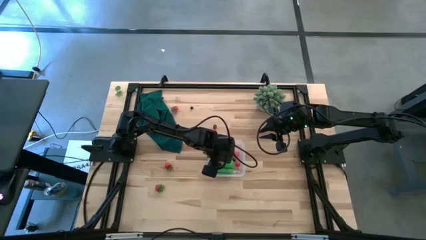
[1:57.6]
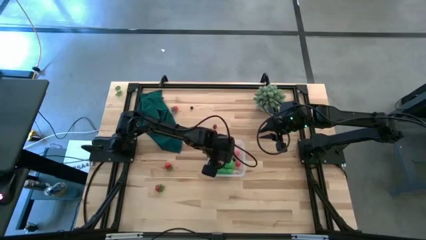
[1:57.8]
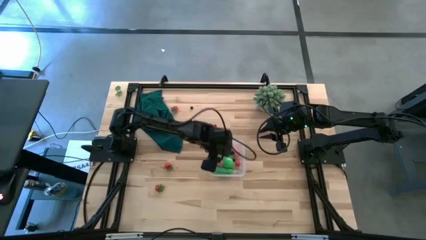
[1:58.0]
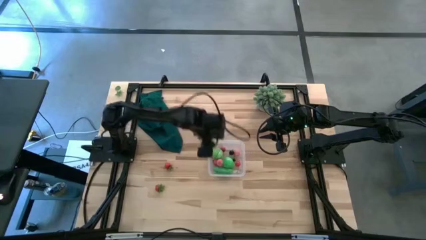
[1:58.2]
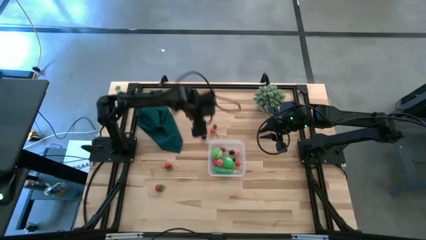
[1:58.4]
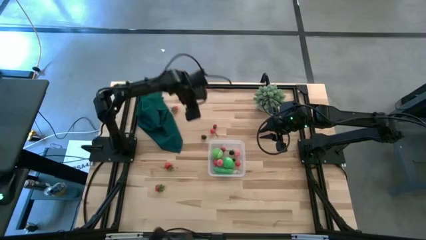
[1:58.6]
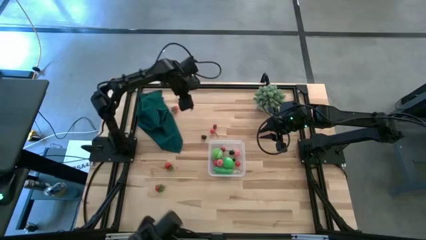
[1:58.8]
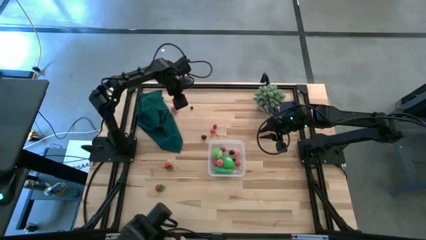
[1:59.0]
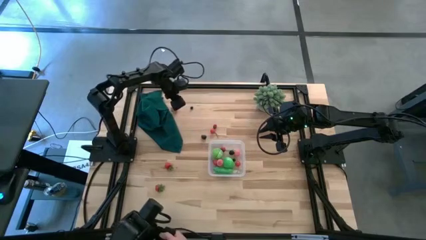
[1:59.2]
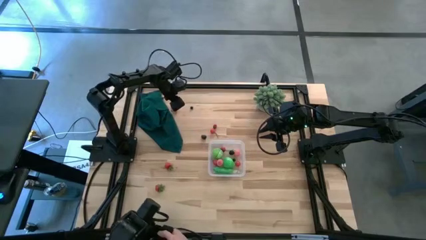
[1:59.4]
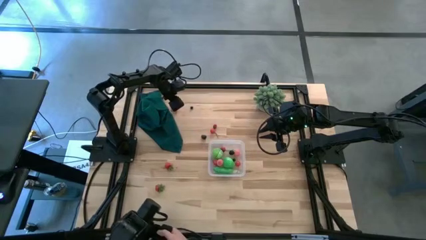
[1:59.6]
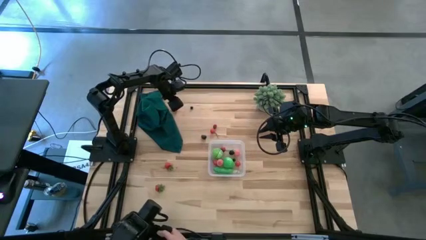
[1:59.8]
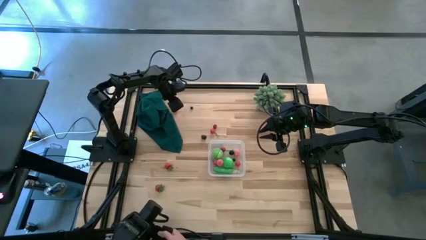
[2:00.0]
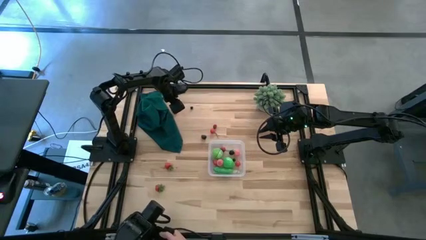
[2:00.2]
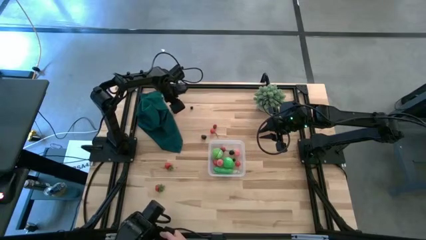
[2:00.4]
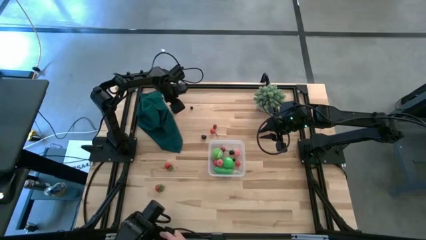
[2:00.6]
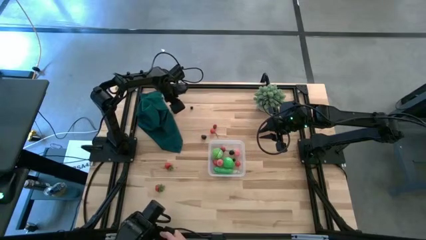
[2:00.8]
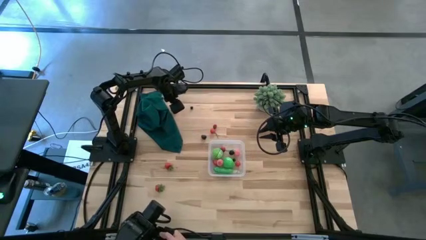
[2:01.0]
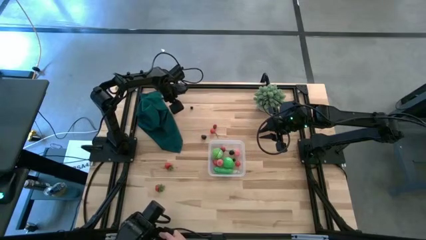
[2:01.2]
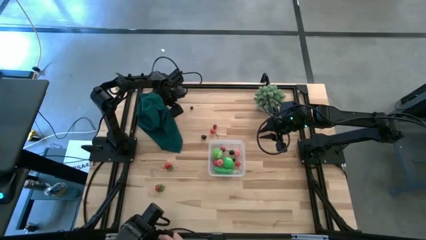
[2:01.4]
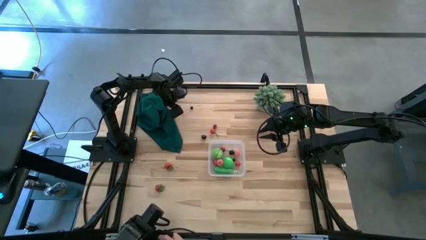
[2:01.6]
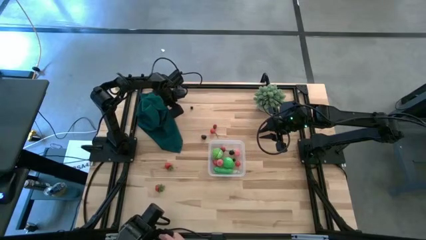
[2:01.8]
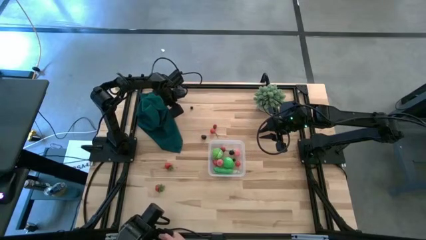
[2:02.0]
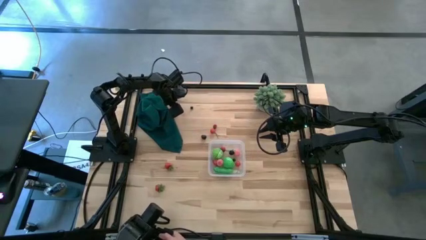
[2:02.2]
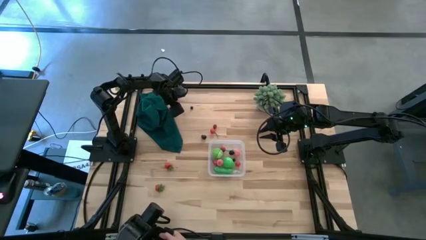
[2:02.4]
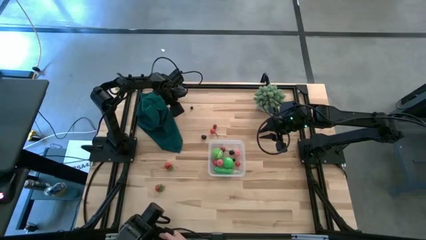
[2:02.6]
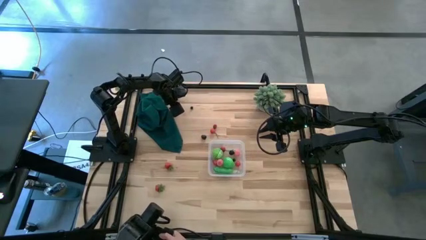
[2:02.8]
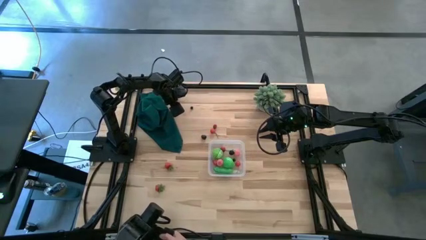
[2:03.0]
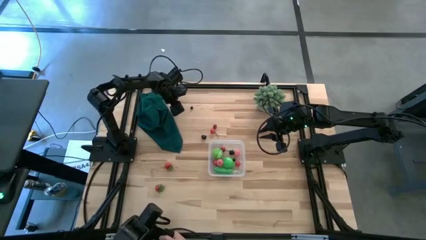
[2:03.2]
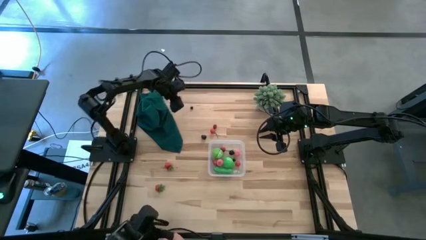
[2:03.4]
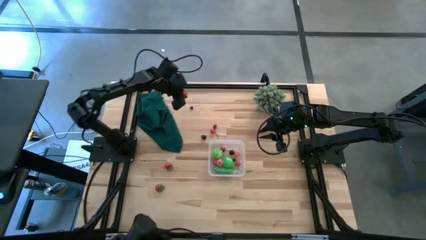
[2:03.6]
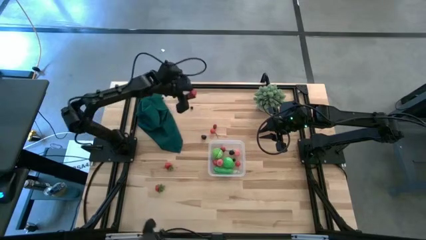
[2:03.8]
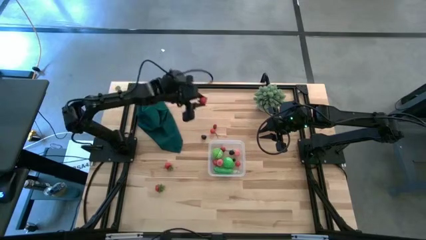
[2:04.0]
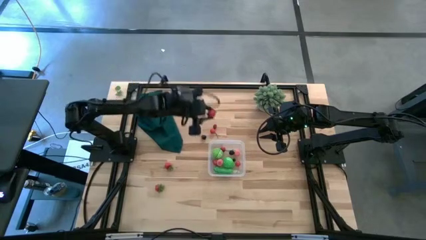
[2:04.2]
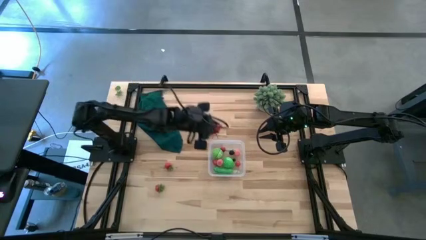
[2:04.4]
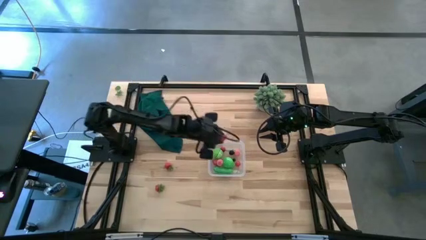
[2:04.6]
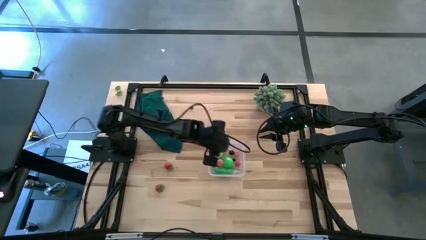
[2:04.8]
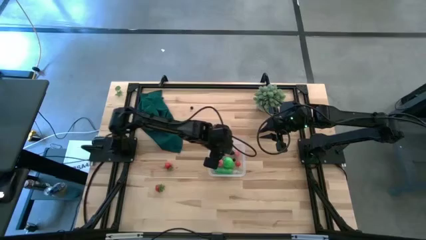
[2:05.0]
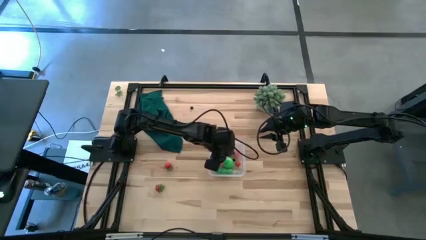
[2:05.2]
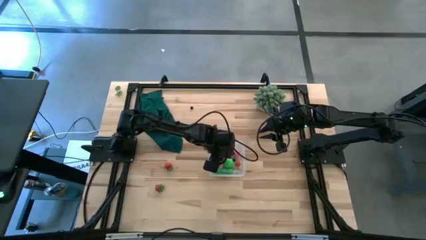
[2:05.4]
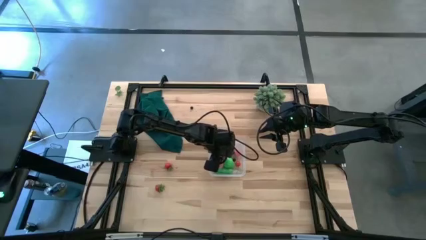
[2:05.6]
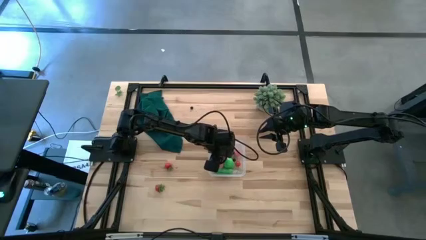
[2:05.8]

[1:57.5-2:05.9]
Task: Pick and placing Produce into tupperware
Put the top red strawberry into the container

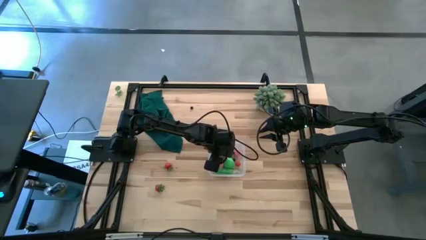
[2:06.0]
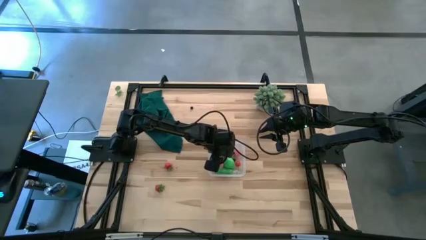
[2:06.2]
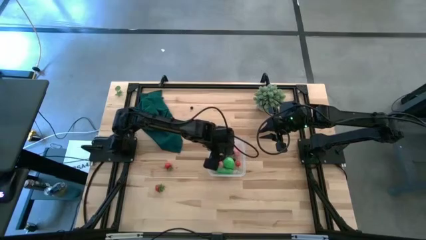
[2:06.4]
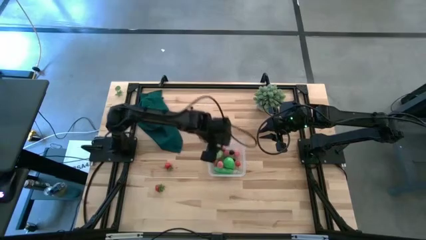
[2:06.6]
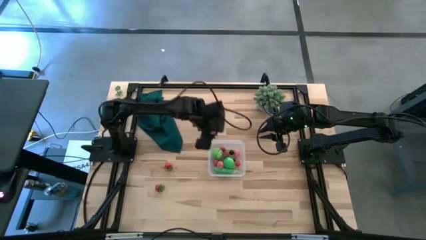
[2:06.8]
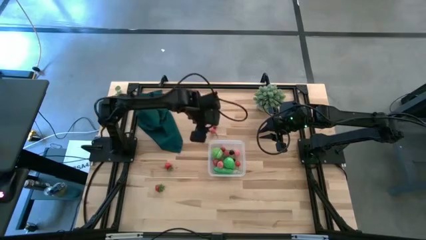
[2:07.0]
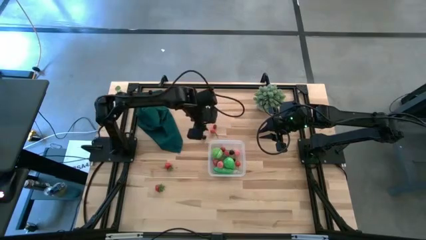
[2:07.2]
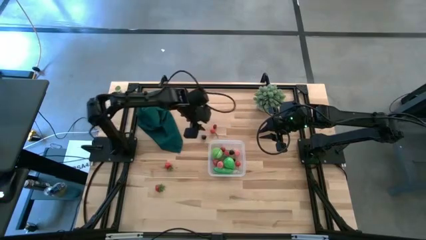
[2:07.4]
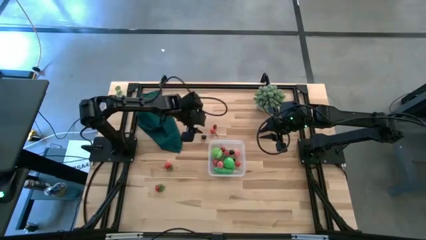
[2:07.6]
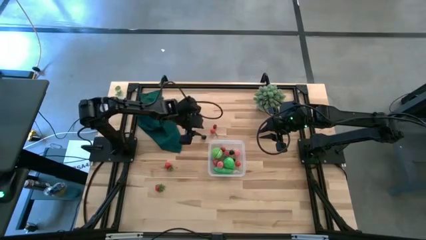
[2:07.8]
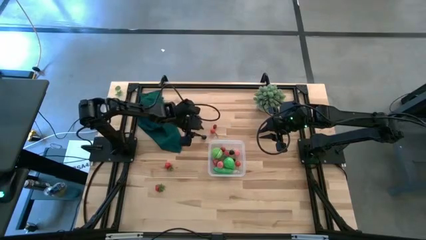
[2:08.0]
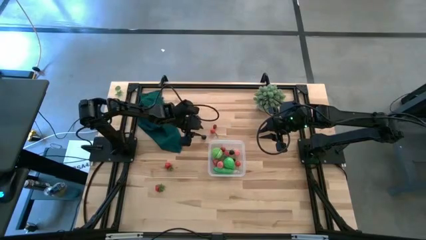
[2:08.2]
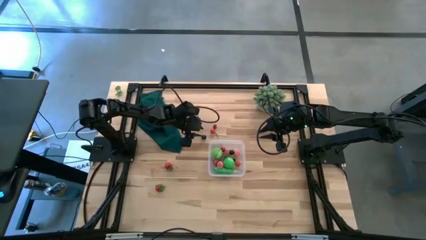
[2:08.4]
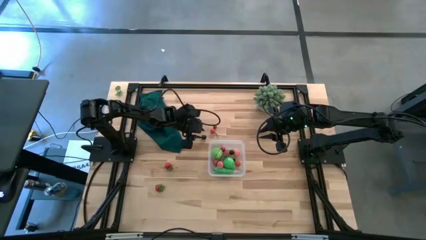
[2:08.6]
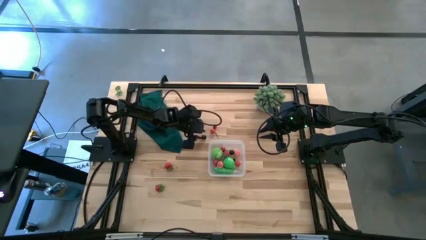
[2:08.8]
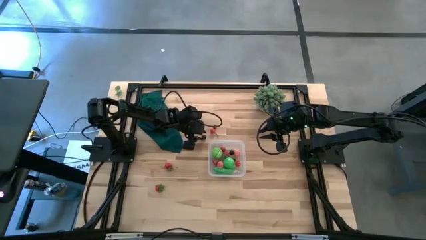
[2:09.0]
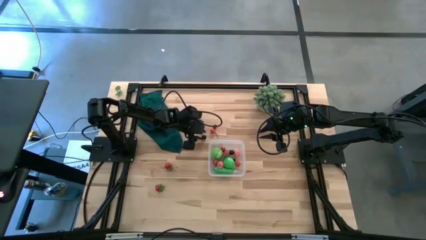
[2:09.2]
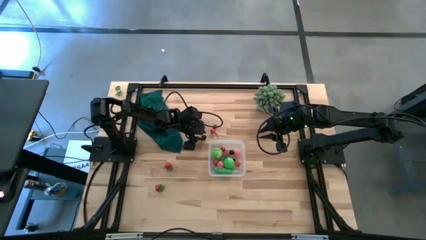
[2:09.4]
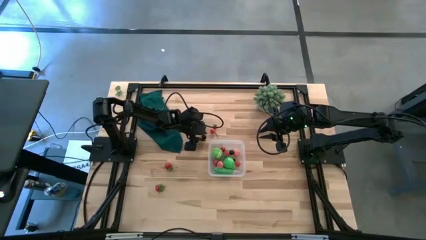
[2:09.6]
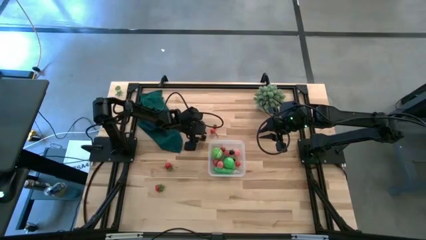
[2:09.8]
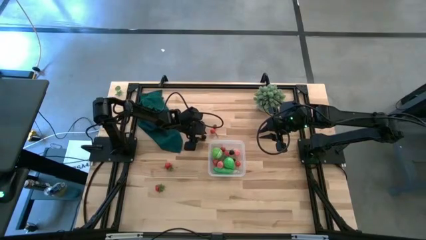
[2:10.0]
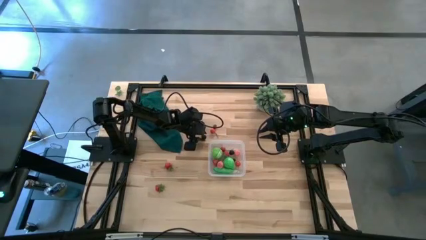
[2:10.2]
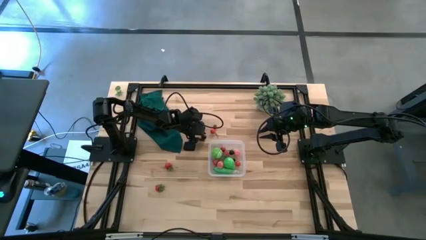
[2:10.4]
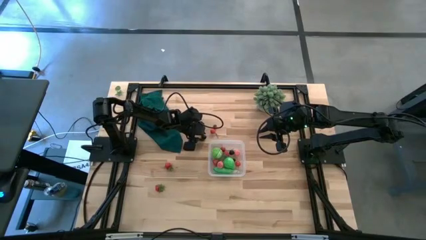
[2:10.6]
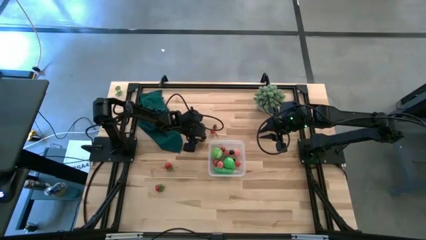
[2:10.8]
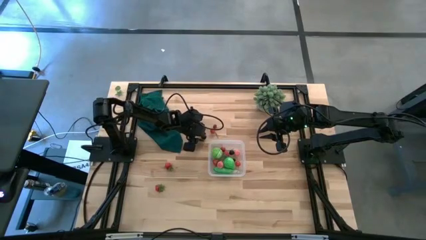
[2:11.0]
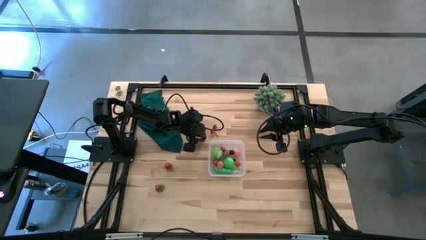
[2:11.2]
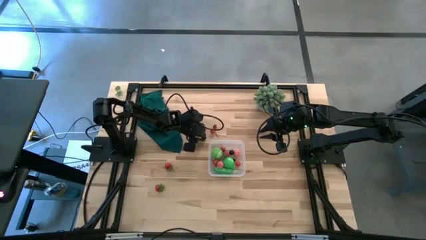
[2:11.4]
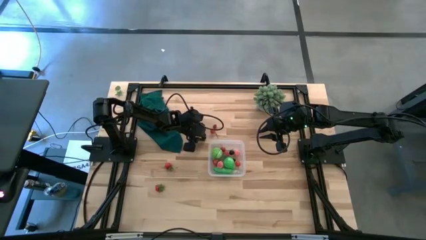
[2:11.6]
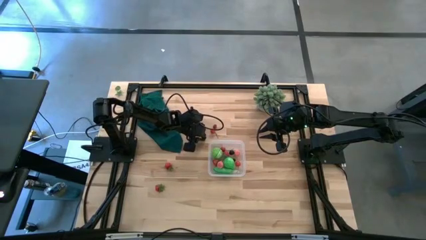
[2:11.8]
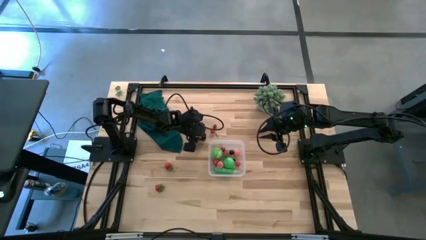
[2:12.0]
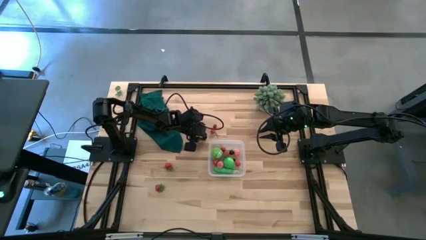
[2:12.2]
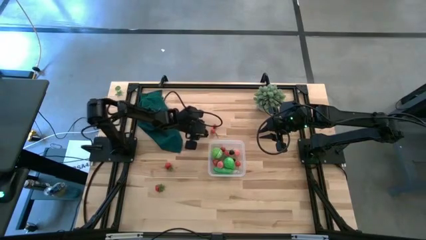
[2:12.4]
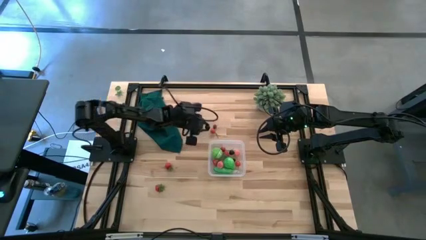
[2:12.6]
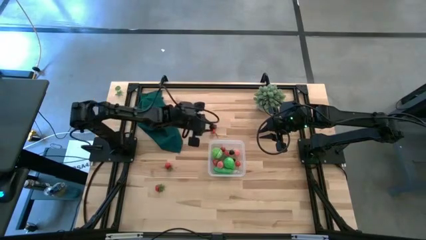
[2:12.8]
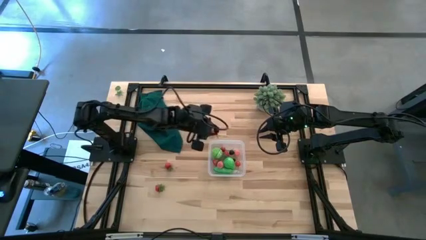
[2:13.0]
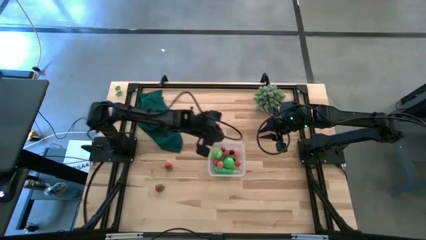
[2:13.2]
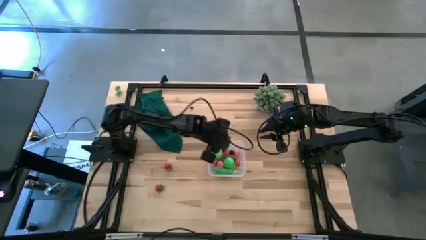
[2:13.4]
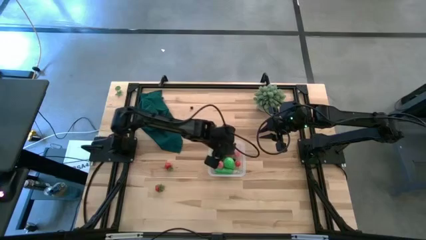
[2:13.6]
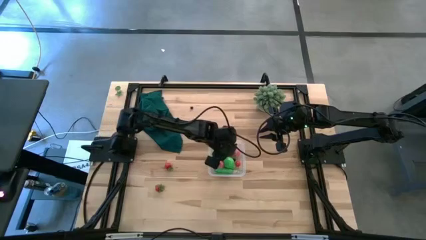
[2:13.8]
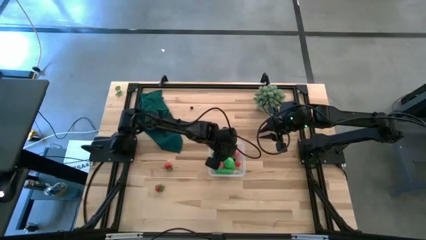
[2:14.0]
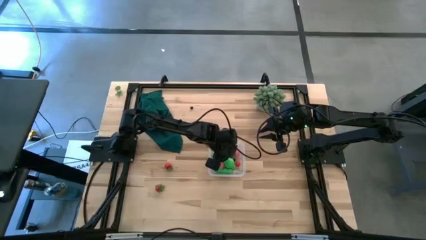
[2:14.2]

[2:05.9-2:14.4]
Put the blackberry into the container
